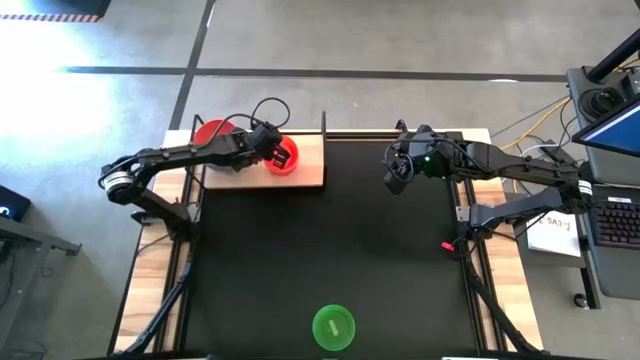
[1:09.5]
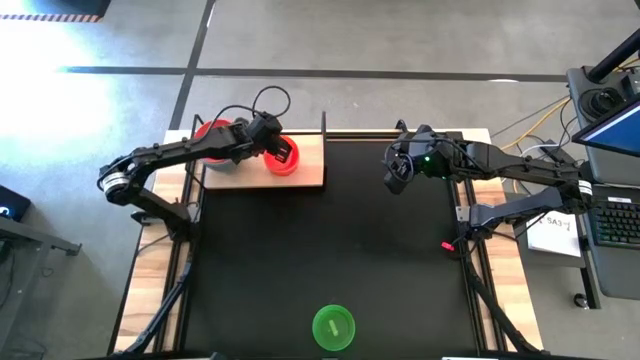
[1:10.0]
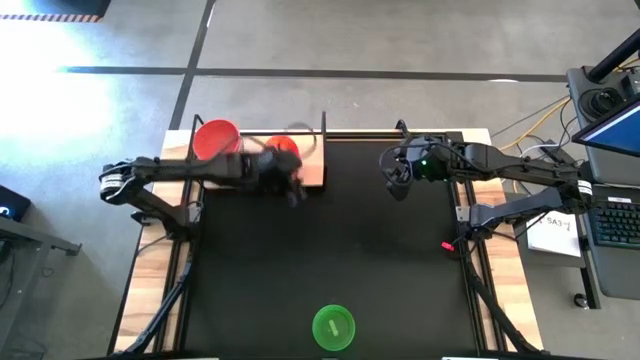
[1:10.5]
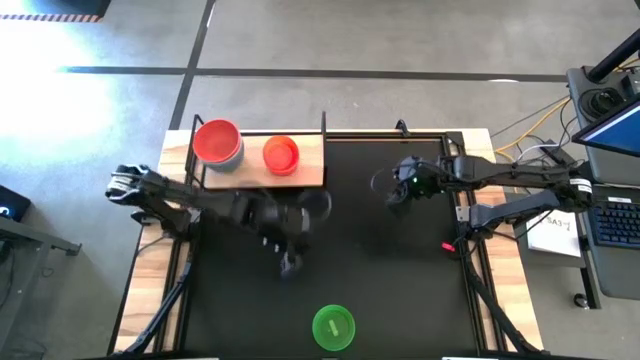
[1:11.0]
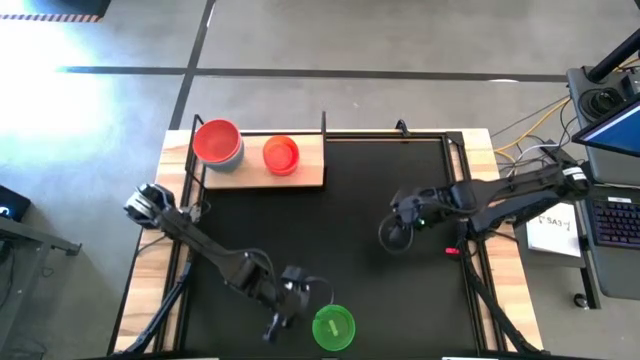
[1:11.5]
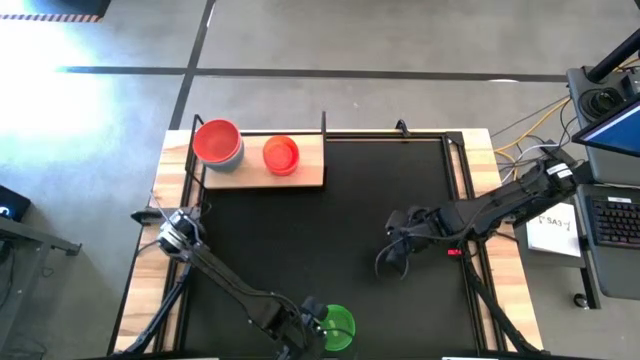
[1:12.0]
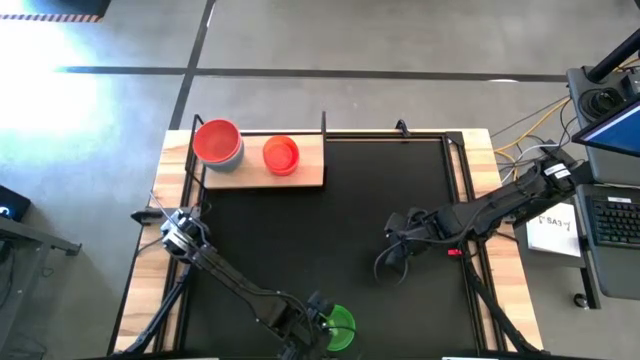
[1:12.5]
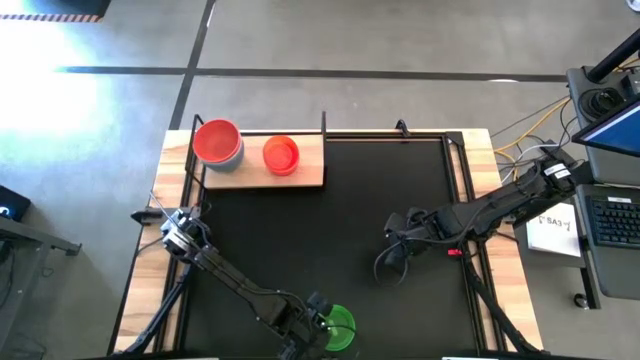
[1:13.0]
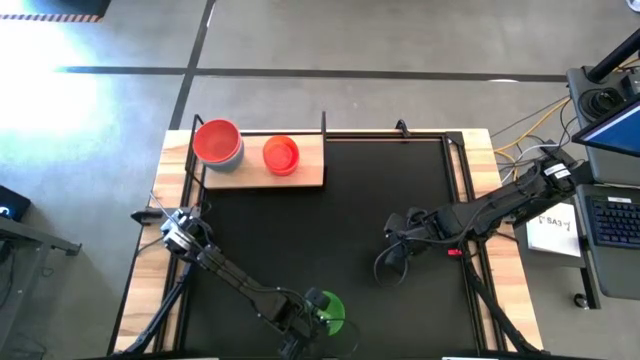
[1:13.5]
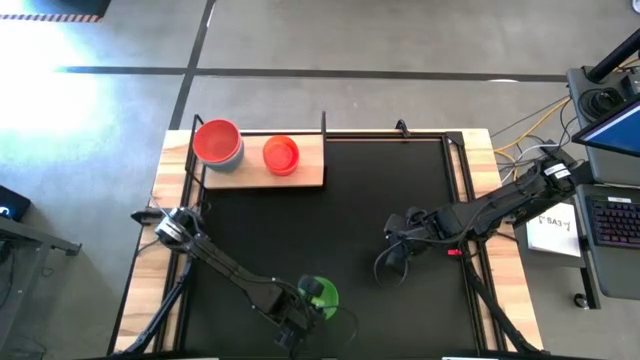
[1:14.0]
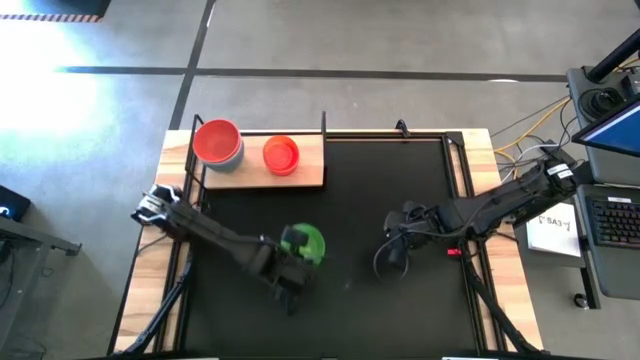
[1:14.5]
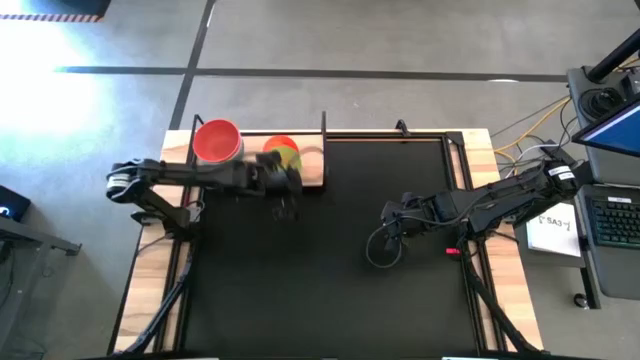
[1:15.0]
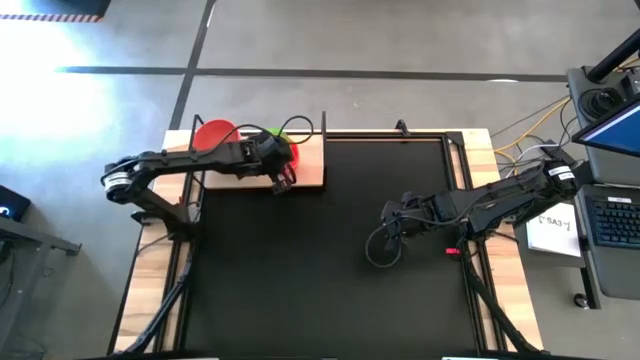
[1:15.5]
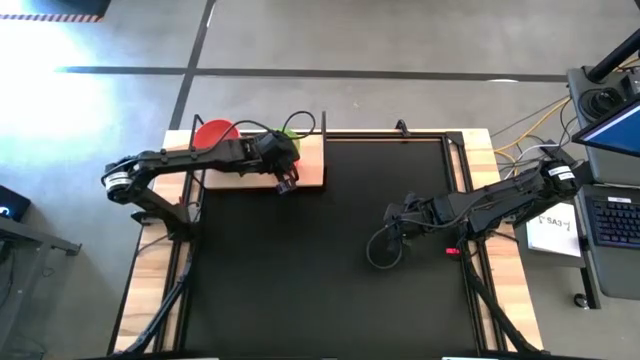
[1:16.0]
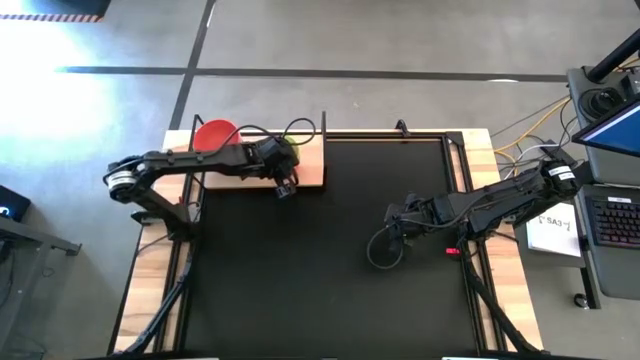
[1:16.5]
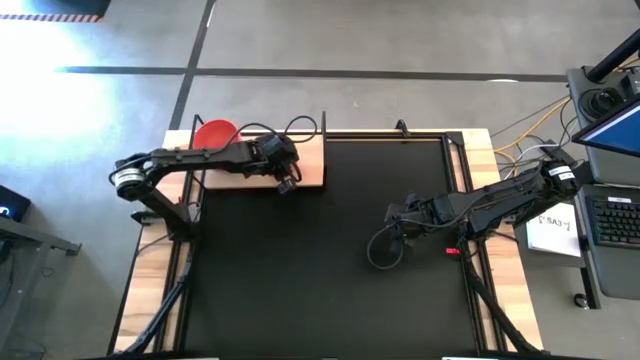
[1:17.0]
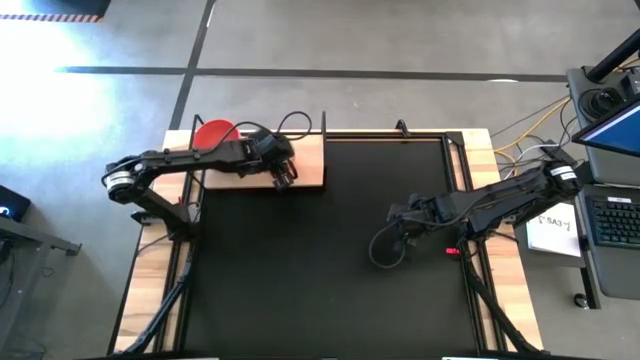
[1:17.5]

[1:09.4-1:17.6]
Task: Place and stack bowls onto a shelf
Stack the green transparent bowl on the orange transparent bowl on the shelf

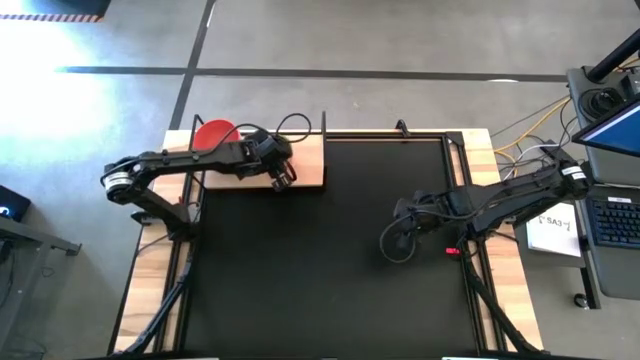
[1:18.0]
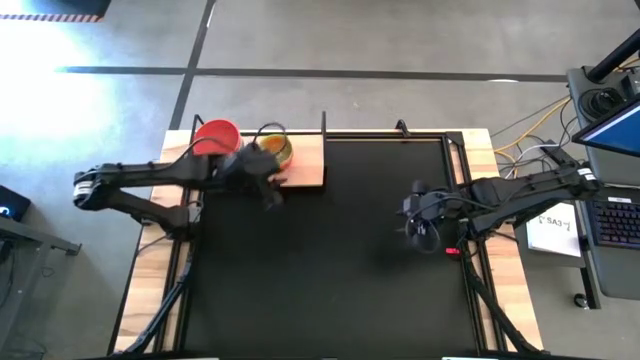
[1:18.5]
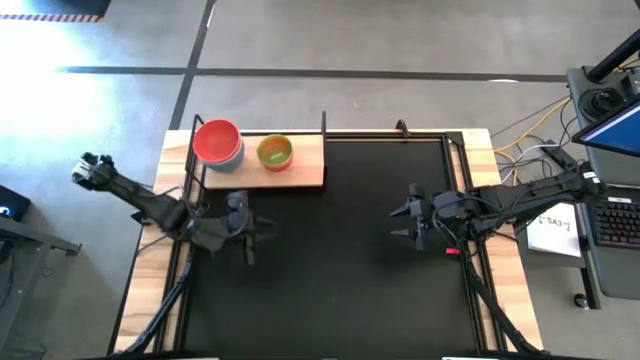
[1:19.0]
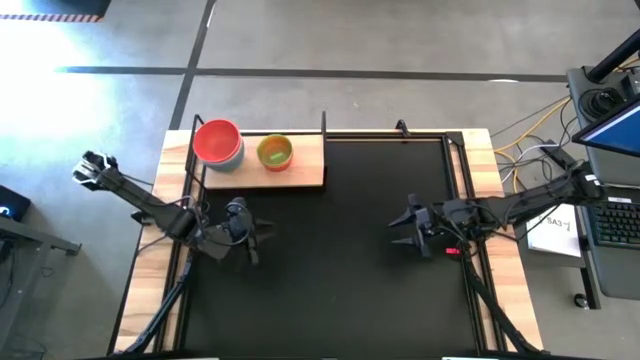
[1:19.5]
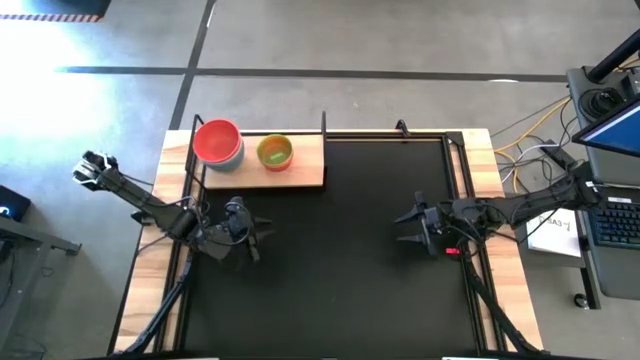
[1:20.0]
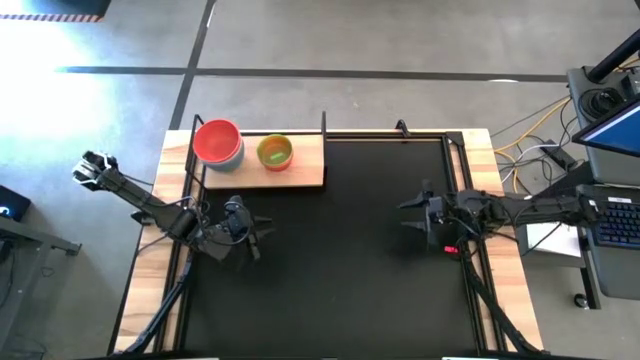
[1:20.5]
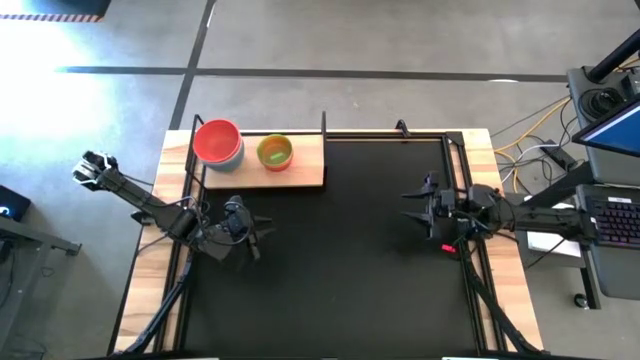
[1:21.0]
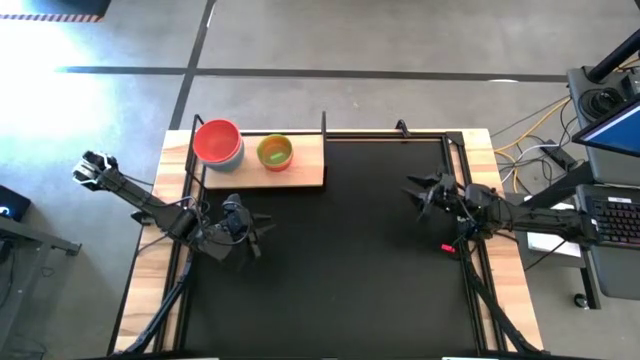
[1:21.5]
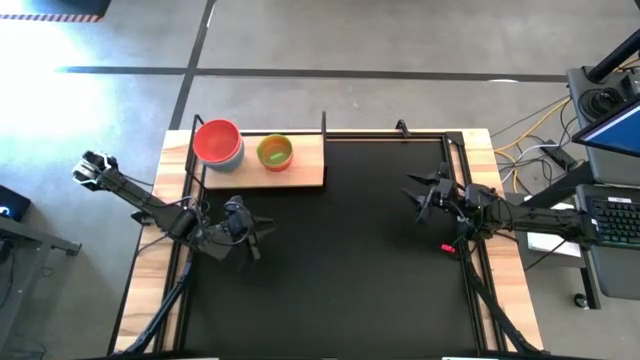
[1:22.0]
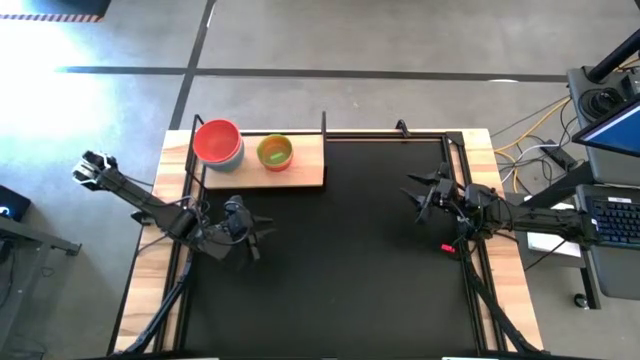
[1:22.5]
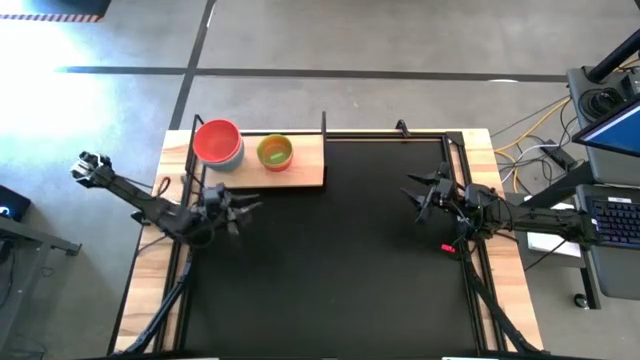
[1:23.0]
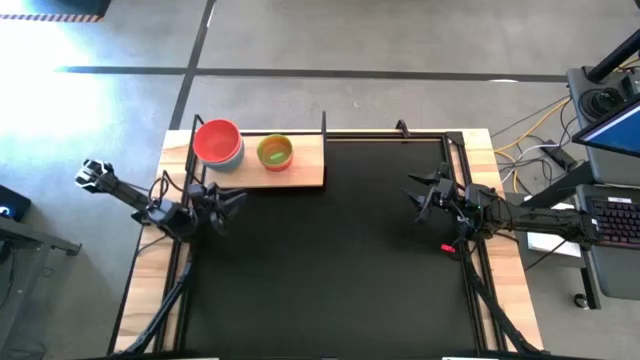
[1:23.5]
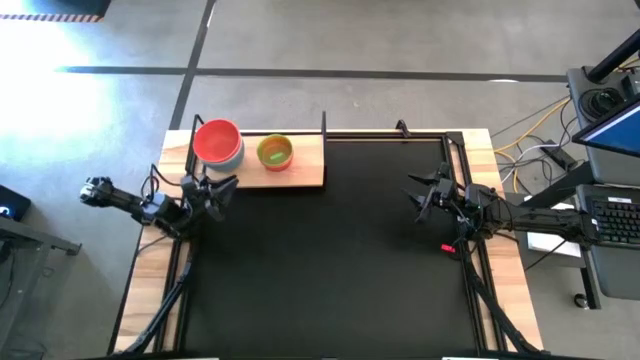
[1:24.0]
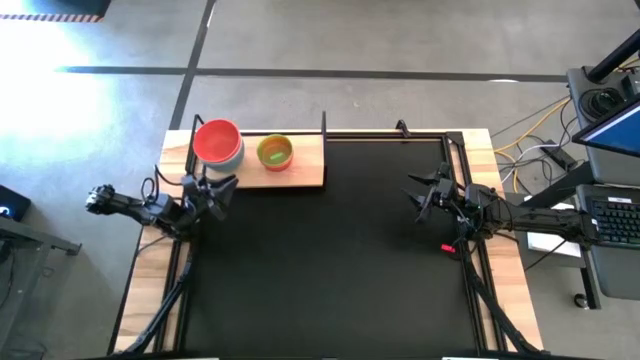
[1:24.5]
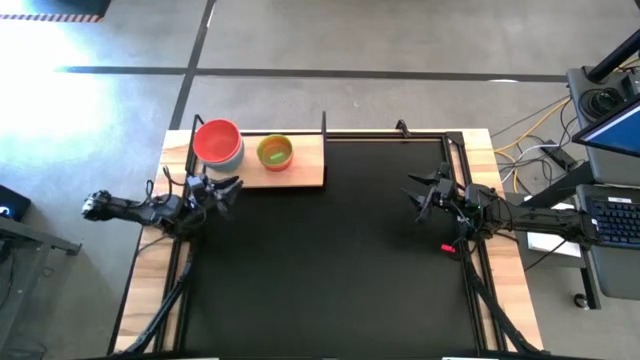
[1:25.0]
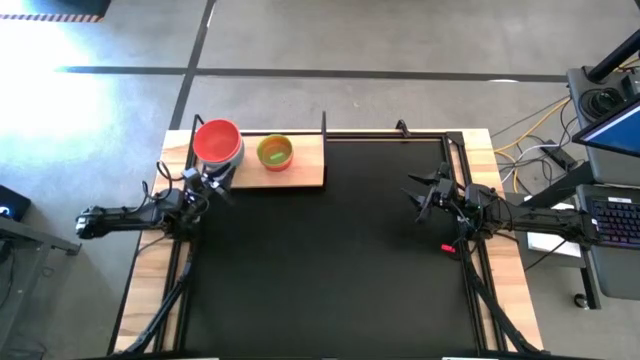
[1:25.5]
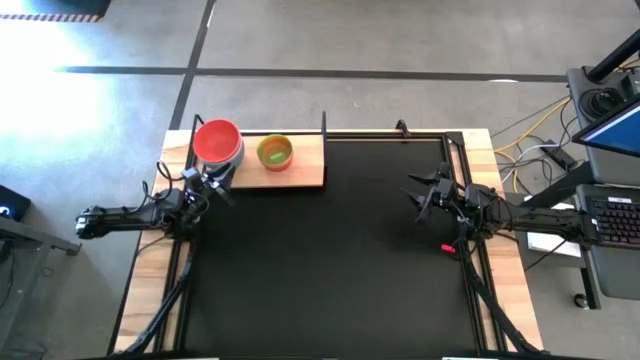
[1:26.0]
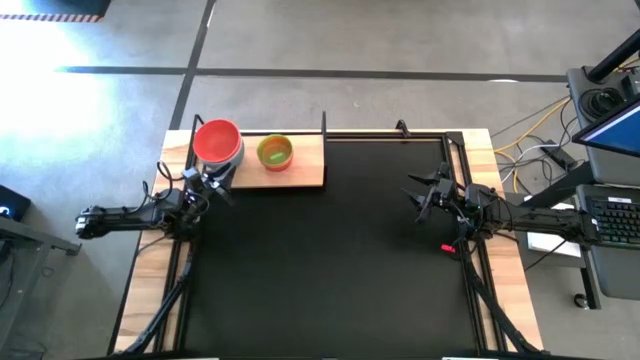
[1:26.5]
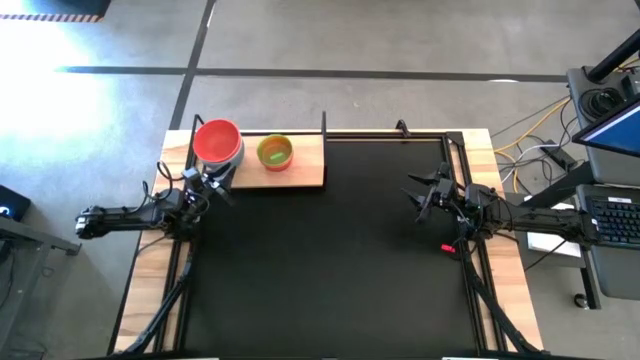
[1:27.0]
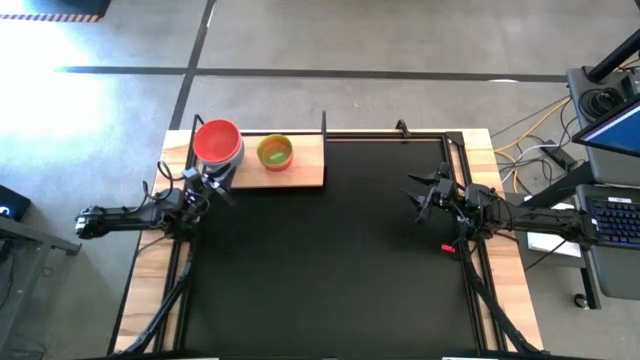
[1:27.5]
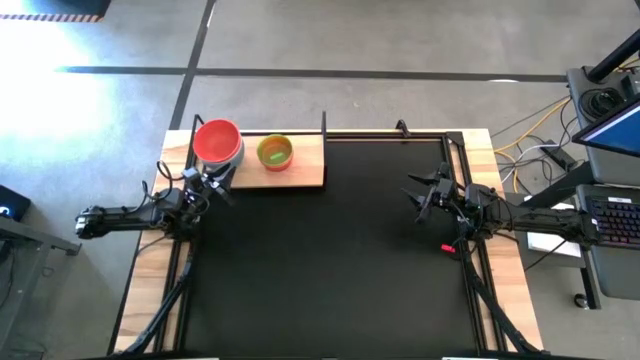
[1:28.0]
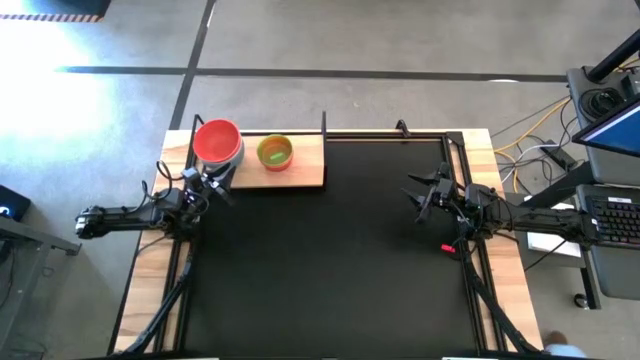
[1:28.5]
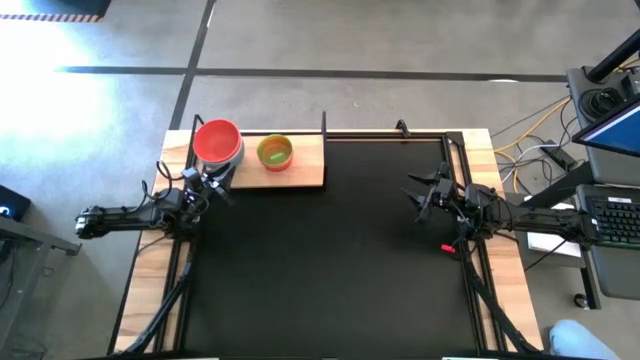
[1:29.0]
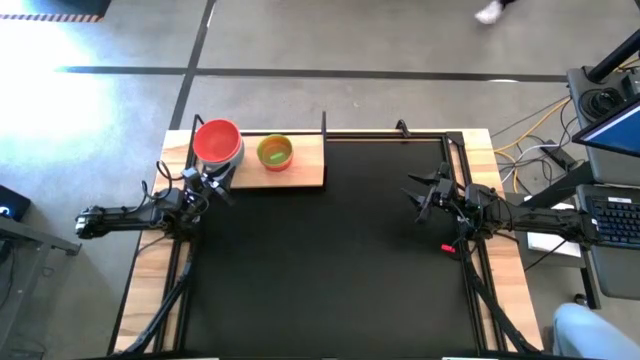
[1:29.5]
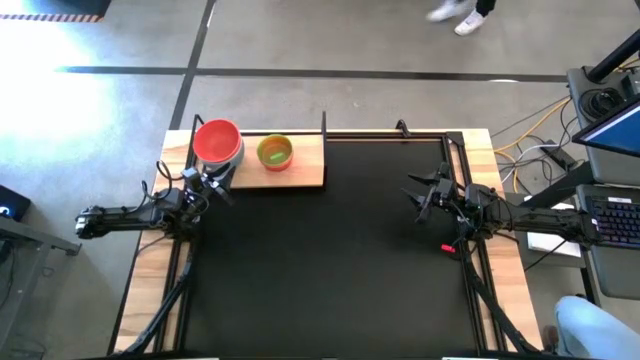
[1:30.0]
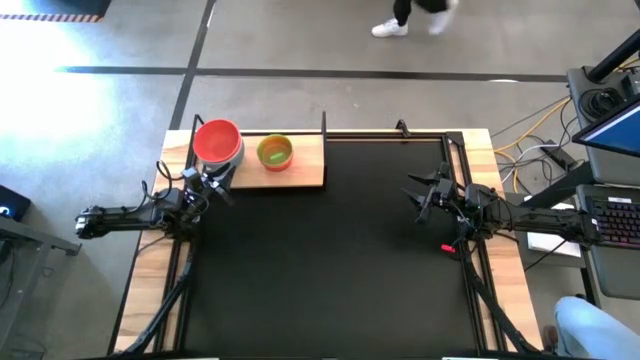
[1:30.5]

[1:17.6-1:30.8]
Return to Home Position

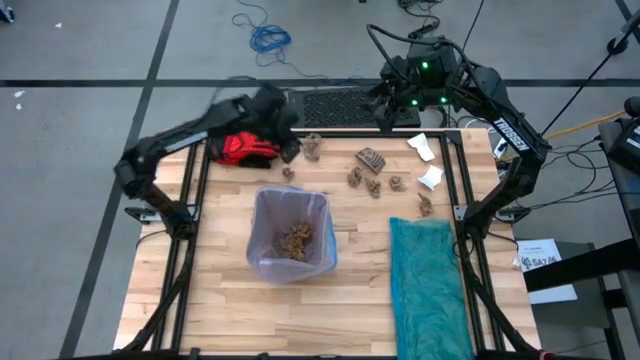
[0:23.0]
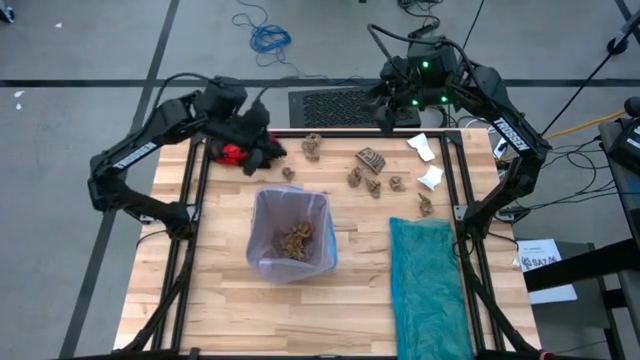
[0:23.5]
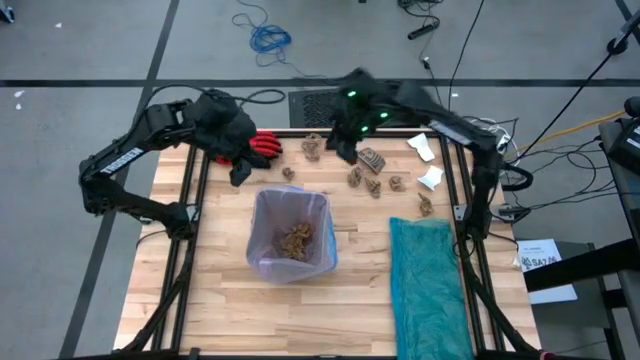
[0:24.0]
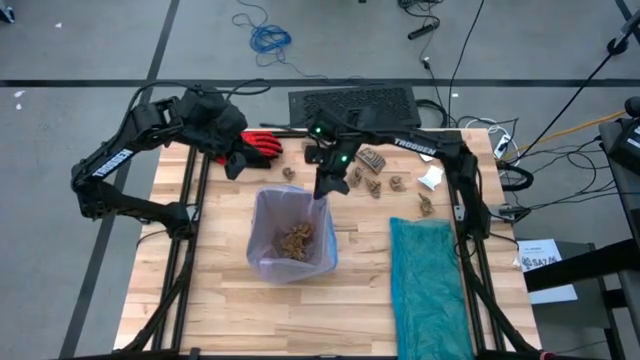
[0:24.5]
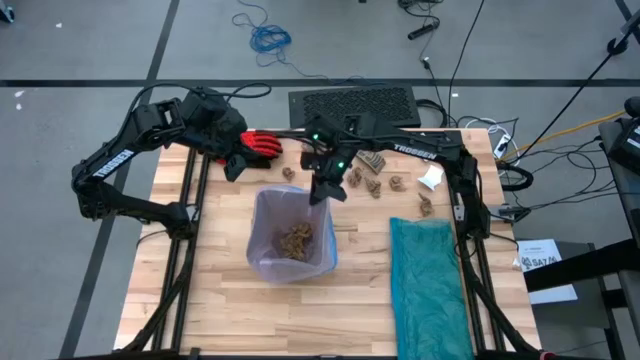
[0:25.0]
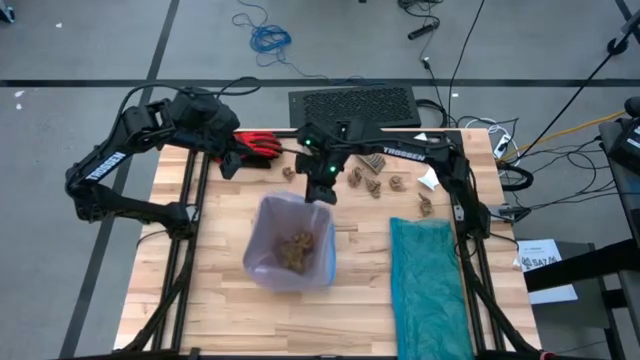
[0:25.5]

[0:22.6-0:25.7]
Task: place trash/remove bag and relplace
Adjust the trash bin
